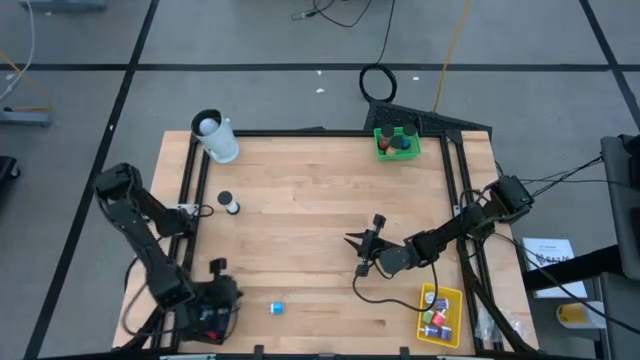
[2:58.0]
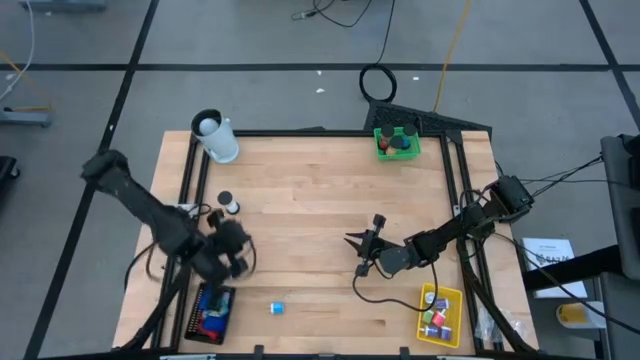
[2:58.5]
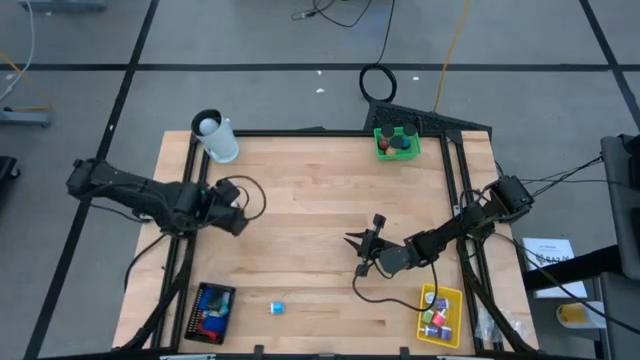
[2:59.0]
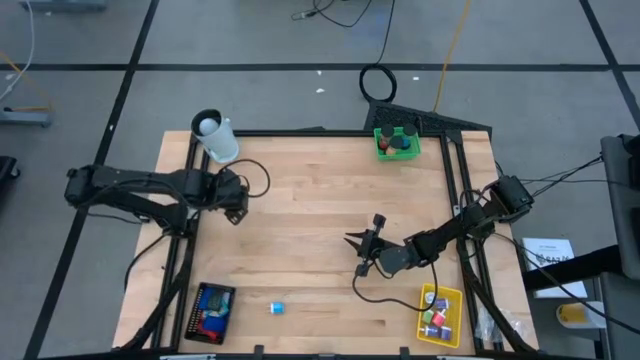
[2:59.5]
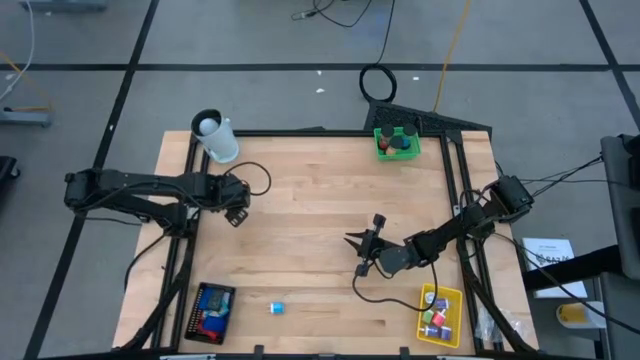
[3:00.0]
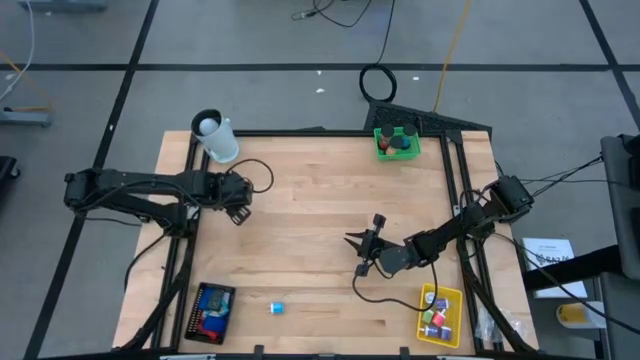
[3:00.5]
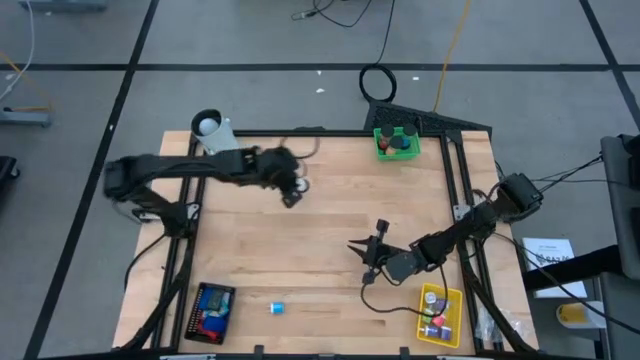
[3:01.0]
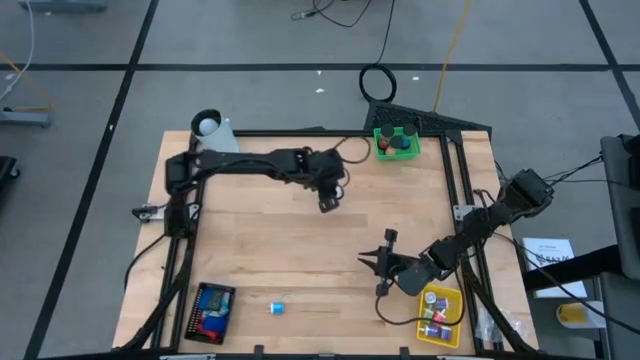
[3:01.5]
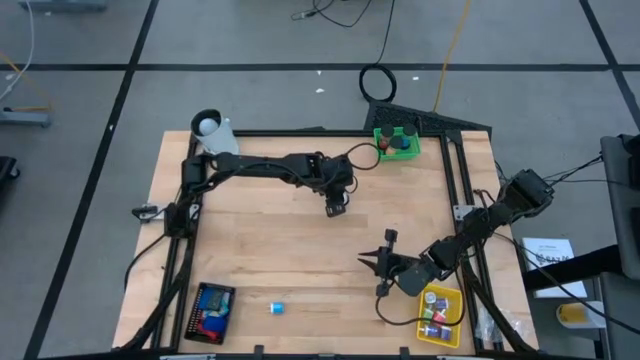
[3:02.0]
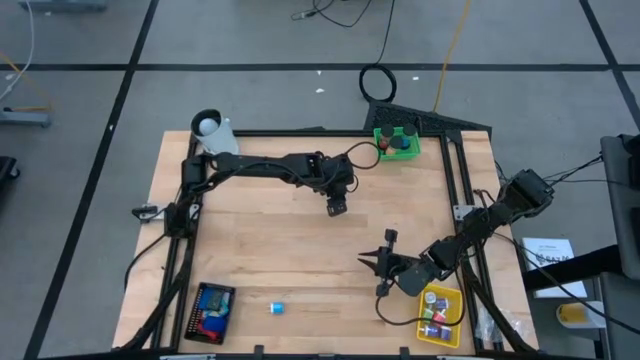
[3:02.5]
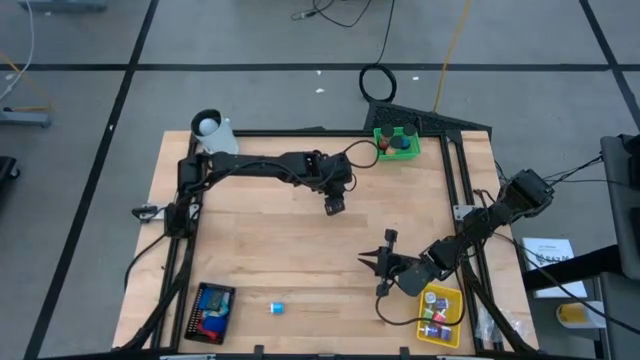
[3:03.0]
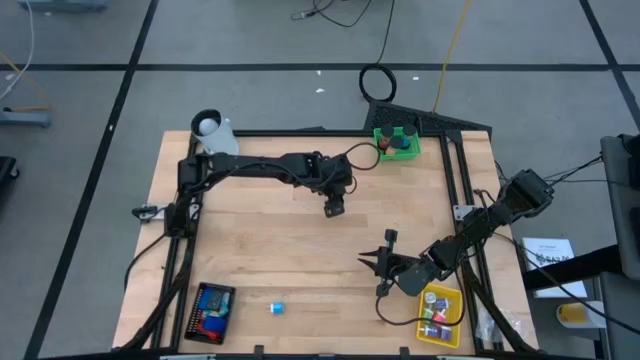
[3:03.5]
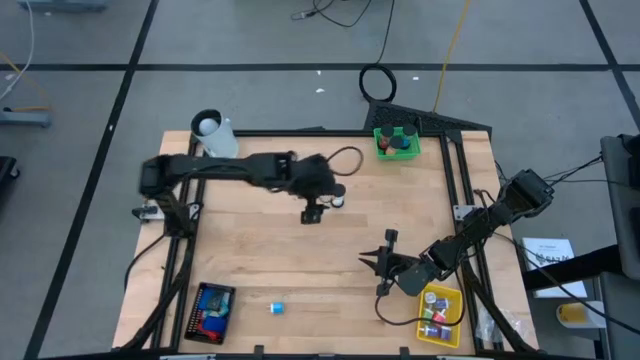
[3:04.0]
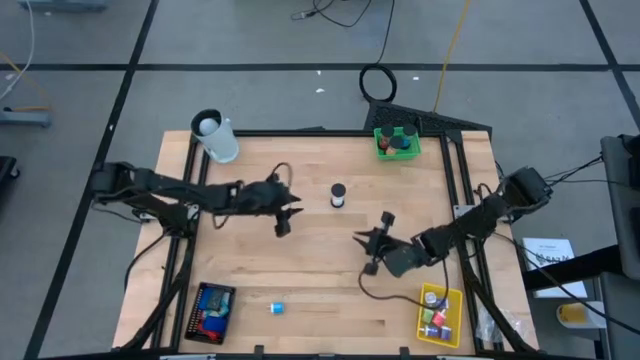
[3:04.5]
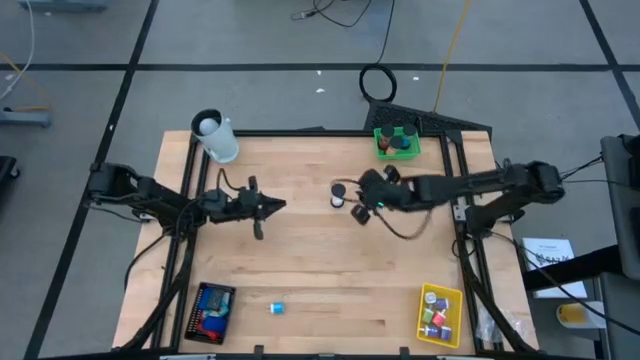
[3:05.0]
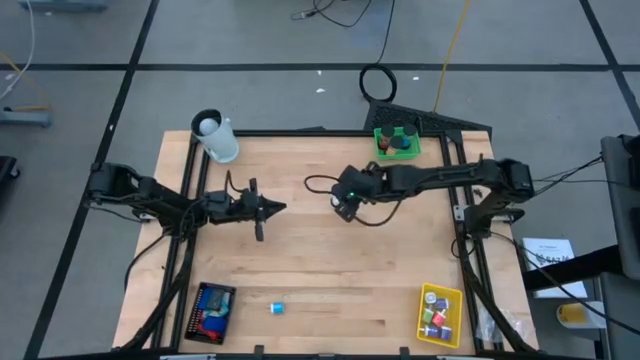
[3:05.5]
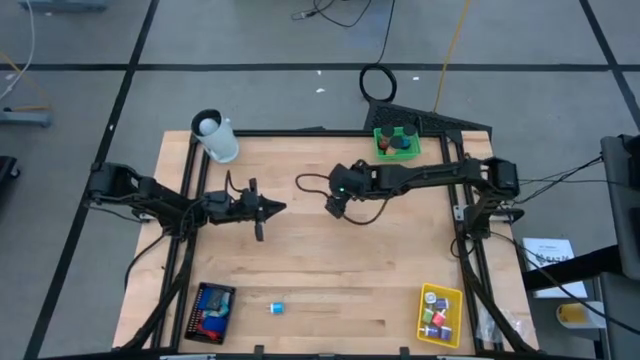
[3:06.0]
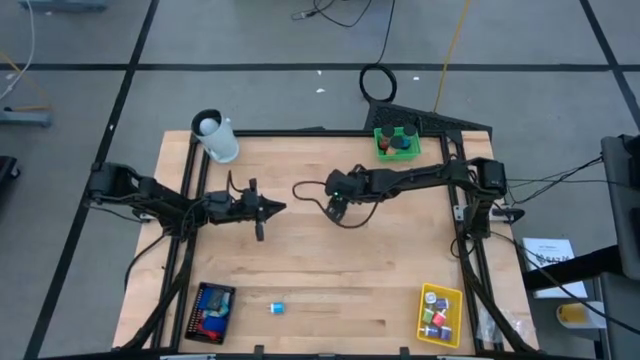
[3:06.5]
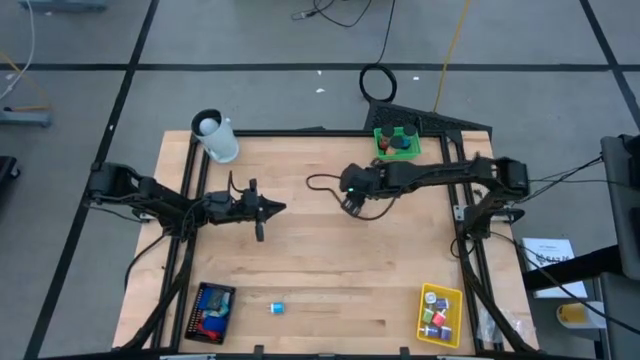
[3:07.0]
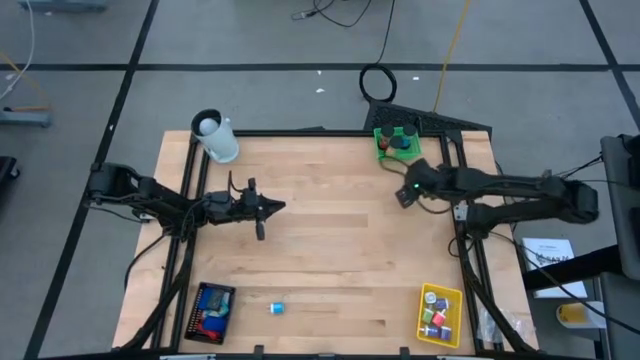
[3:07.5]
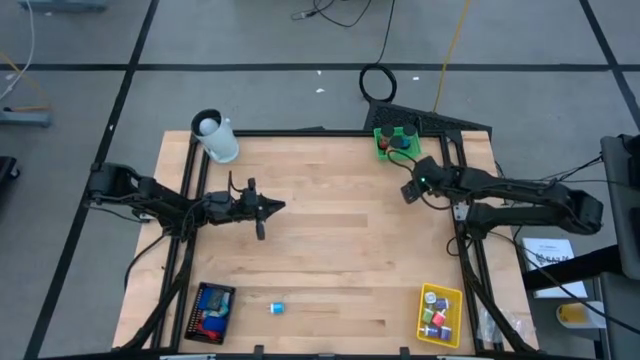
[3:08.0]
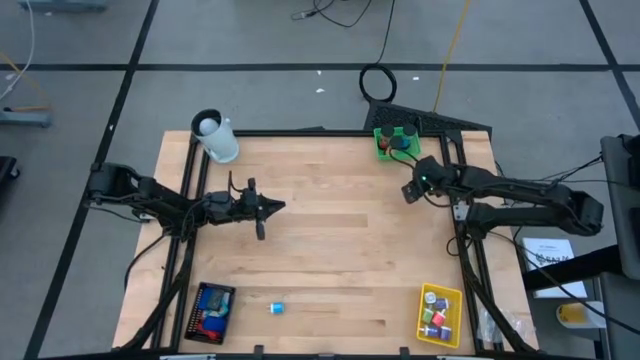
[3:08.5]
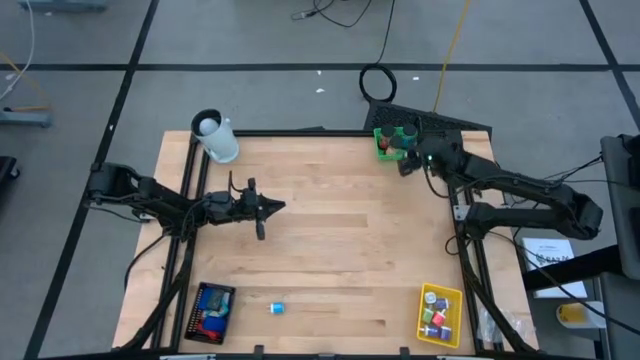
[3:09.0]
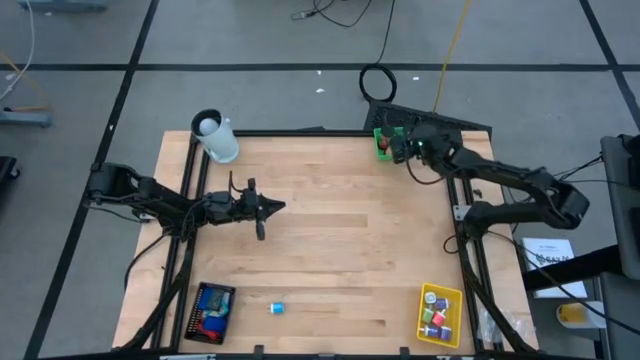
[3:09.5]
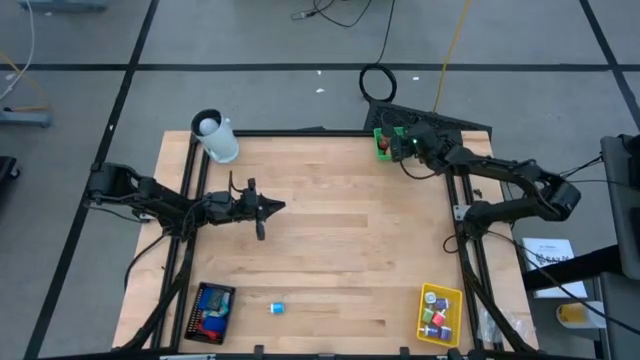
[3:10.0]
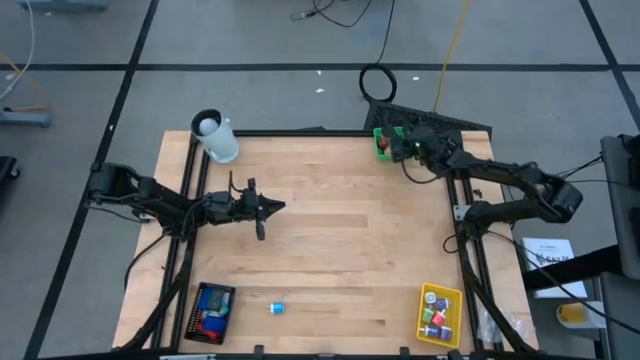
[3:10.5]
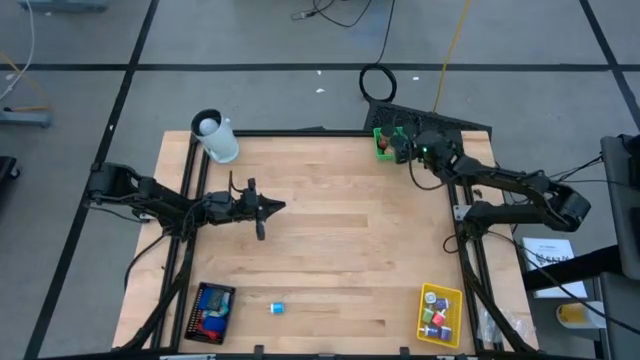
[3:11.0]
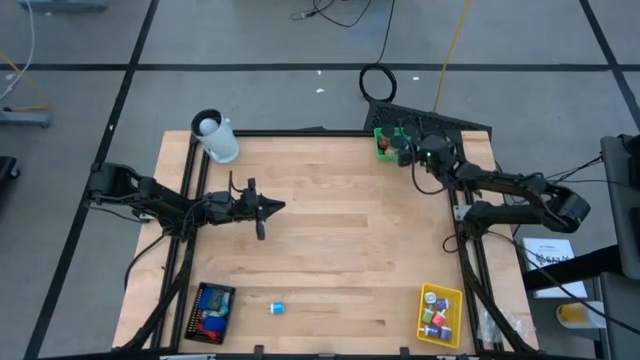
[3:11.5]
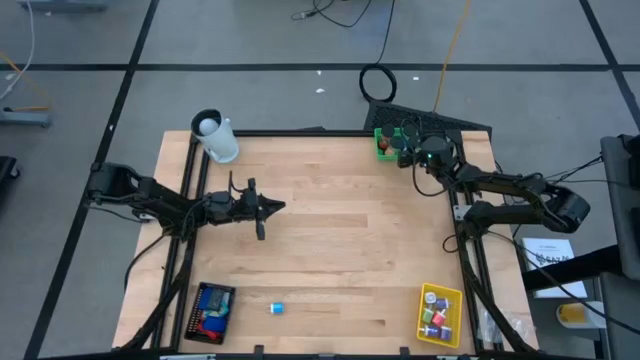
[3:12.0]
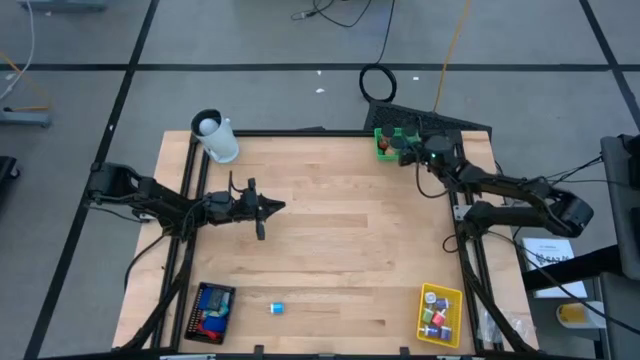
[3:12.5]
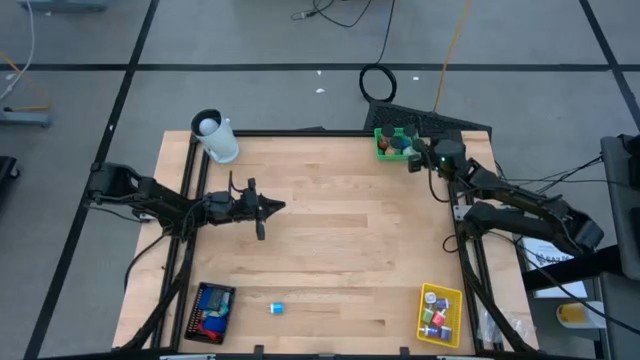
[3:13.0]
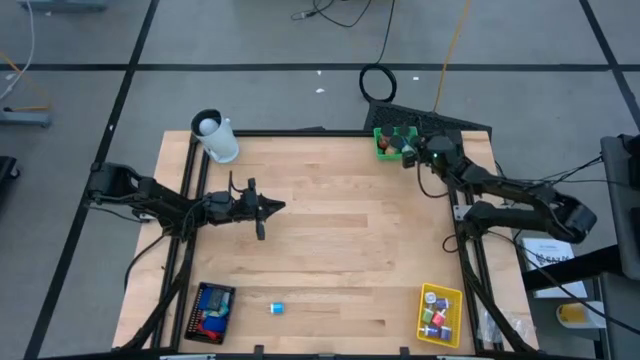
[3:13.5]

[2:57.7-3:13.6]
Task: Pick & Place Office items
Put the white hourglass into the green bin

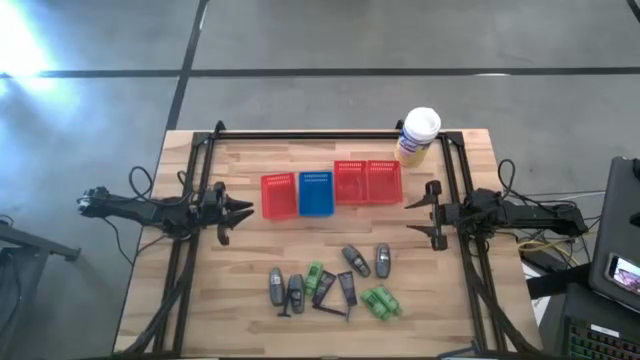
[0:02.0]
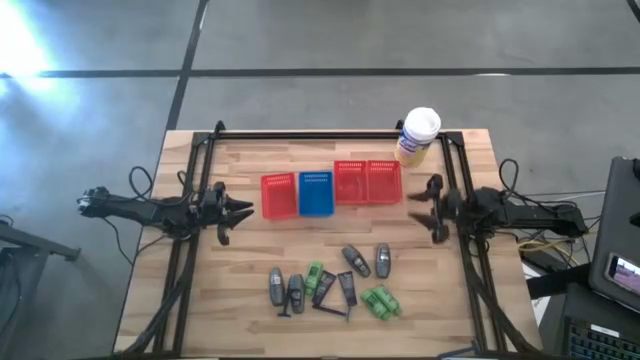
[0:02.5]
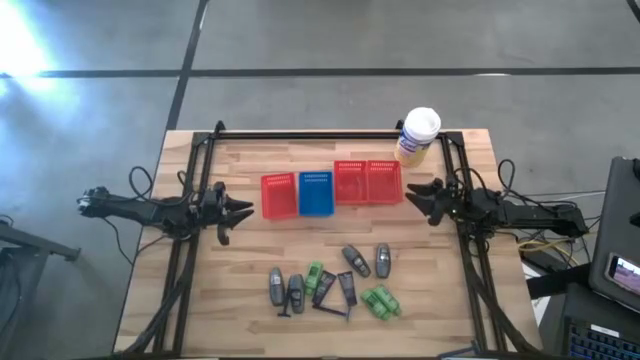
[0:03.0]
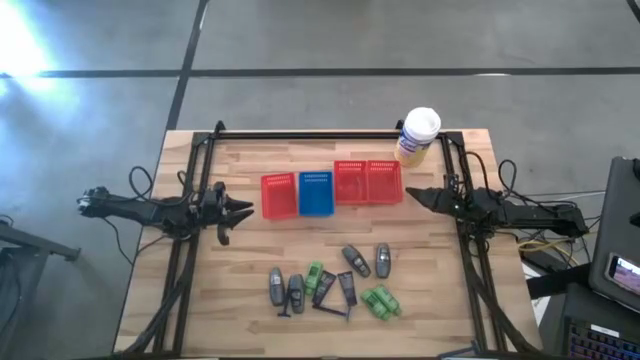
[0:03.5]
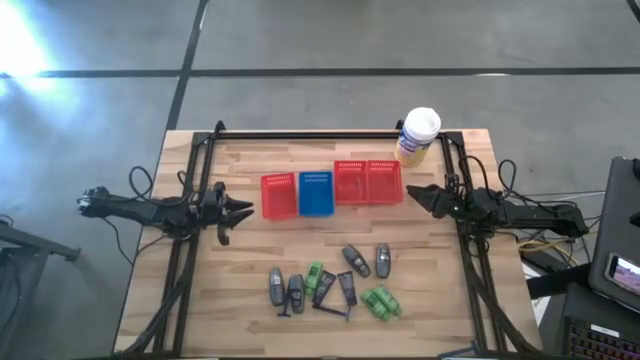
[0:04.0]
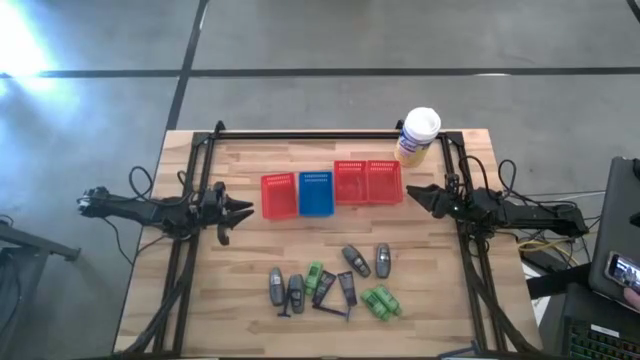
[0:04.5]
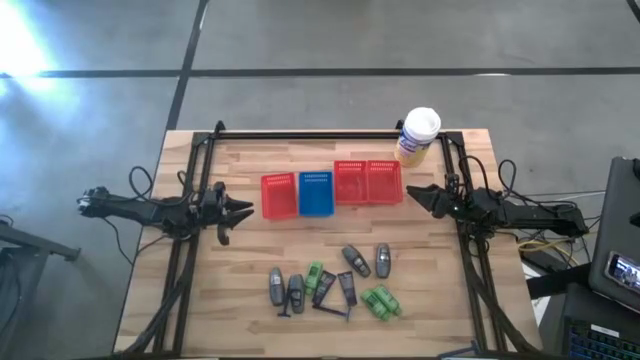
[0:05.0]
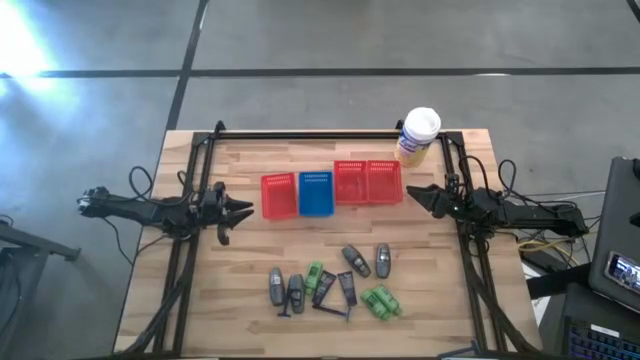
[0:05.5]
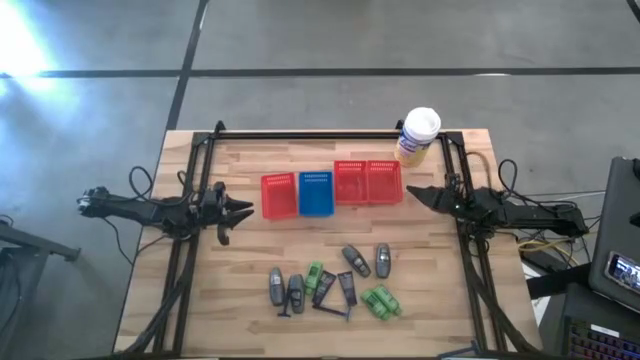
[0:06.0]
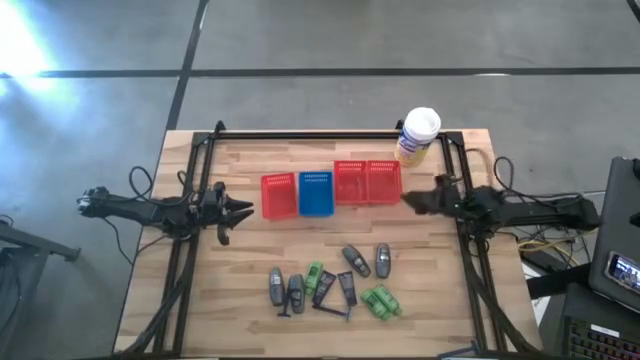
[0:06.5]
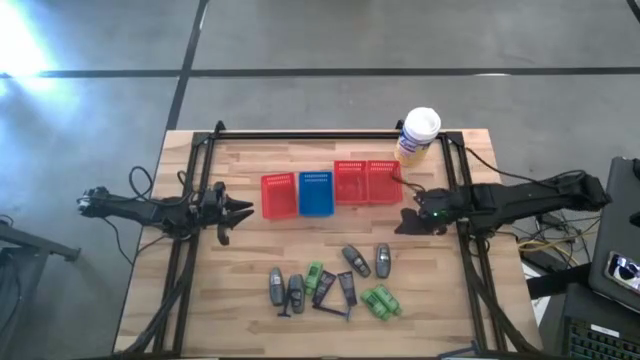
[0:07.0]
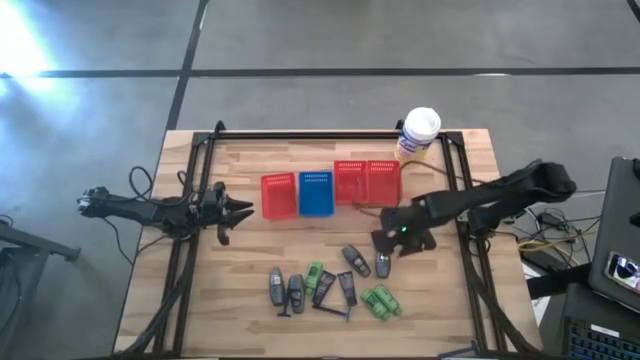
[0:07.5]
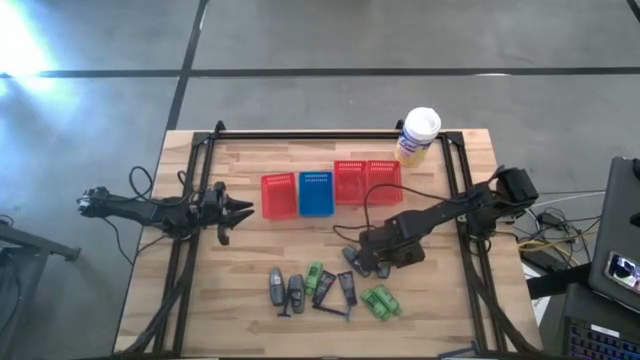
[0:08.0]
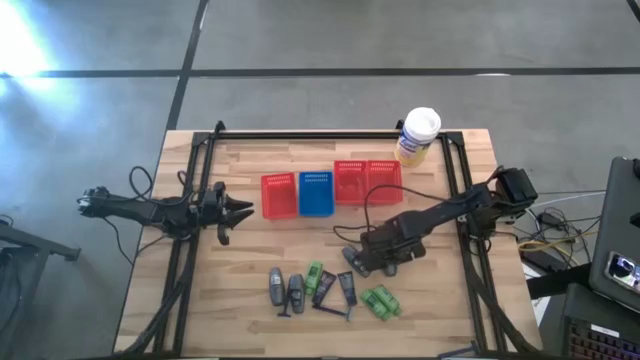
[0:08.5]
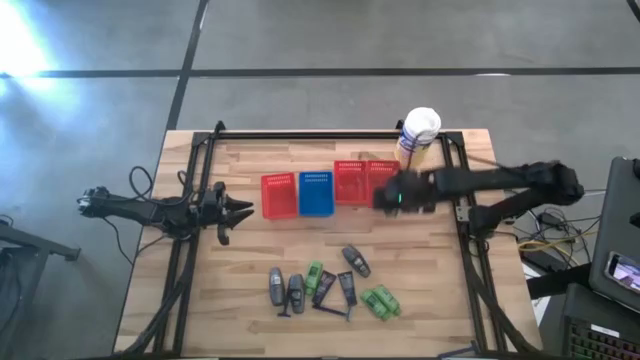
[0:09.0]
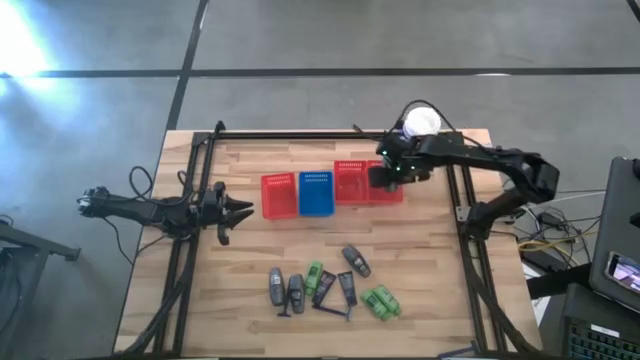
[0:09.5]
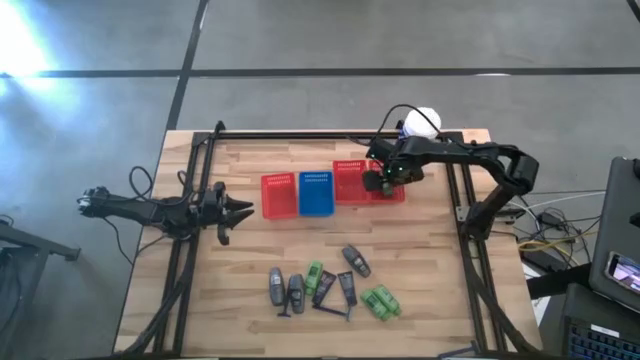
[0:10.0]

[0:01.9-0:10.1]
Task: Pick & Place Travel size toiletries
Put the gray deodorant into the right red bin
